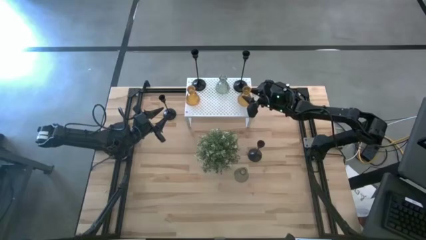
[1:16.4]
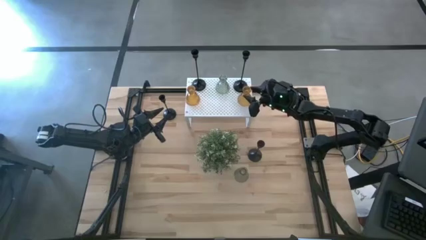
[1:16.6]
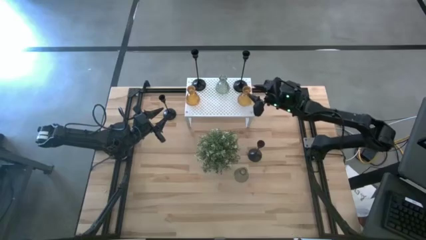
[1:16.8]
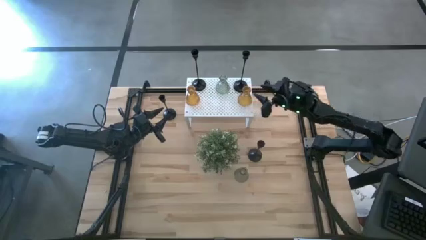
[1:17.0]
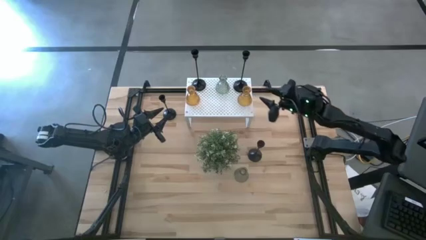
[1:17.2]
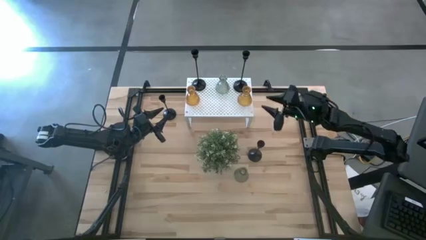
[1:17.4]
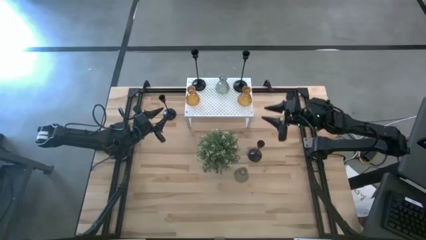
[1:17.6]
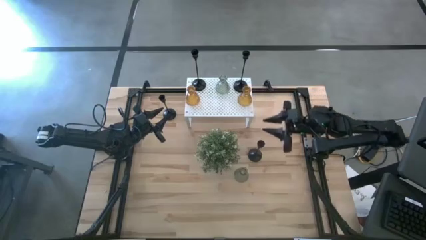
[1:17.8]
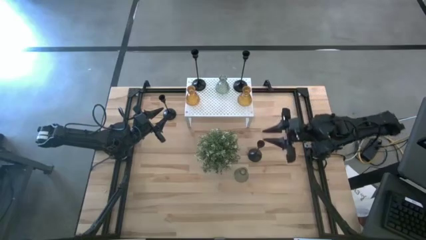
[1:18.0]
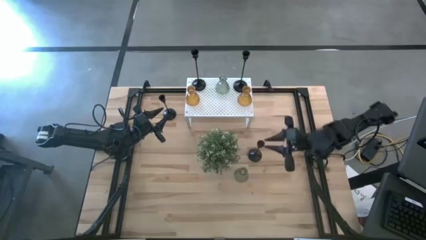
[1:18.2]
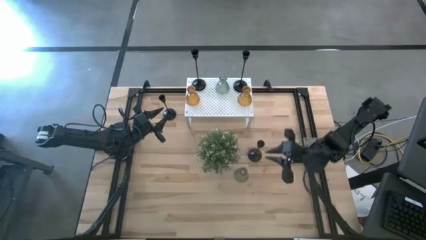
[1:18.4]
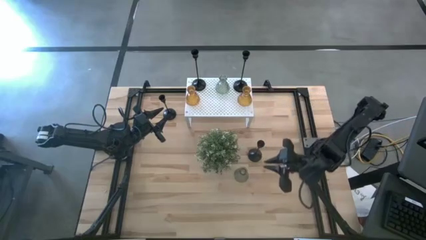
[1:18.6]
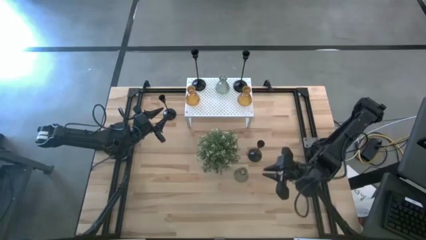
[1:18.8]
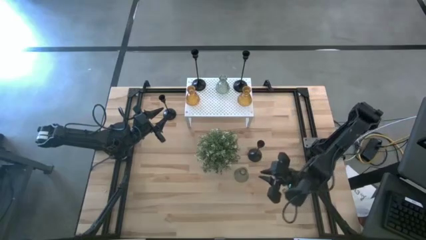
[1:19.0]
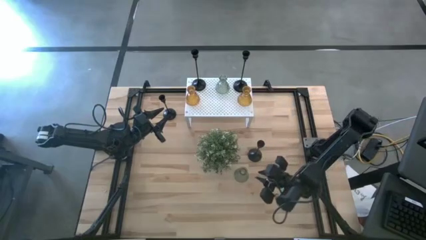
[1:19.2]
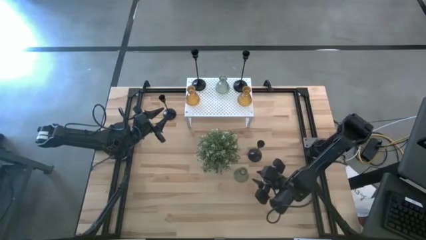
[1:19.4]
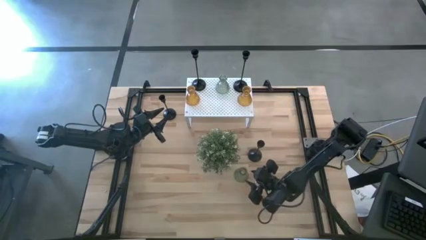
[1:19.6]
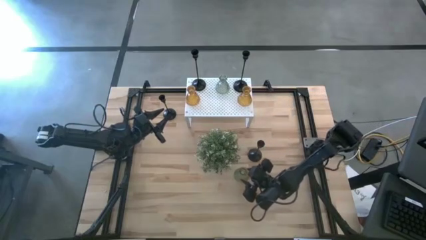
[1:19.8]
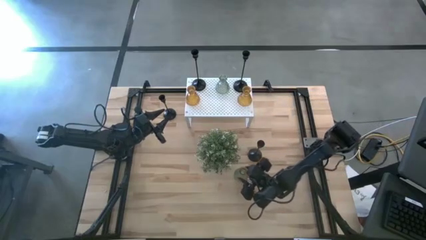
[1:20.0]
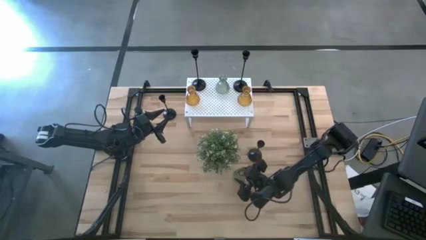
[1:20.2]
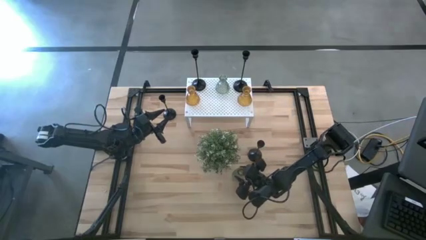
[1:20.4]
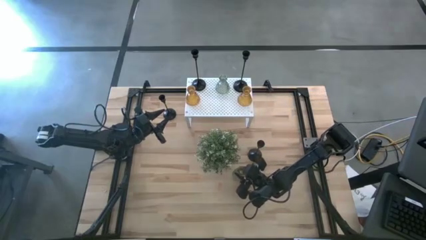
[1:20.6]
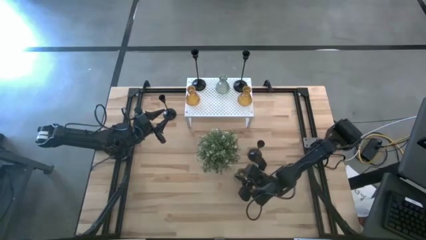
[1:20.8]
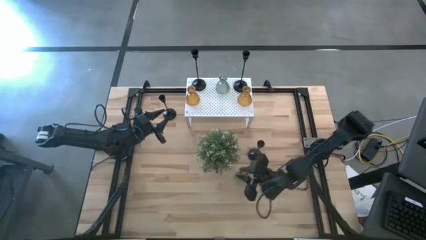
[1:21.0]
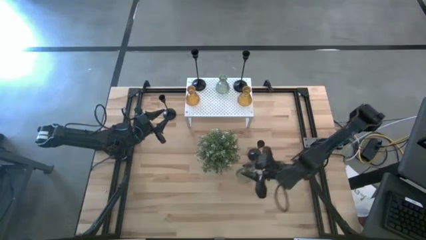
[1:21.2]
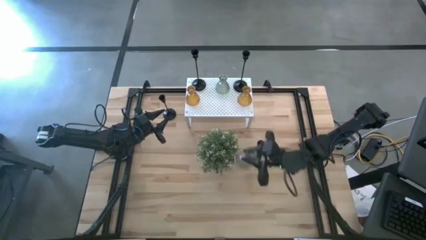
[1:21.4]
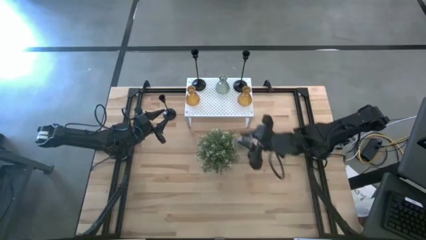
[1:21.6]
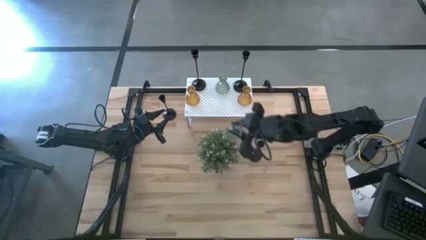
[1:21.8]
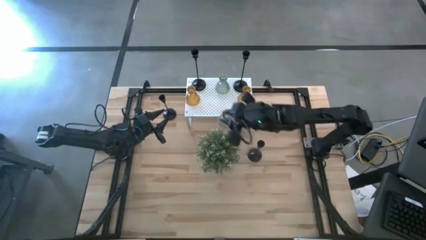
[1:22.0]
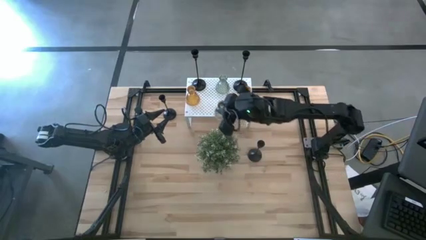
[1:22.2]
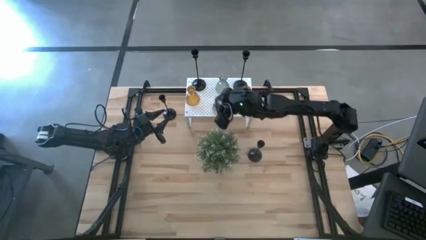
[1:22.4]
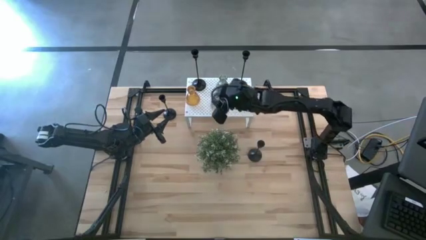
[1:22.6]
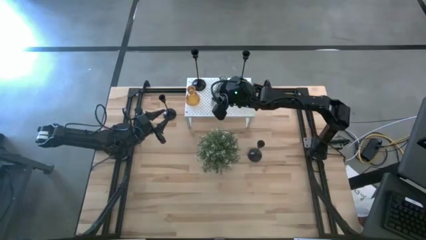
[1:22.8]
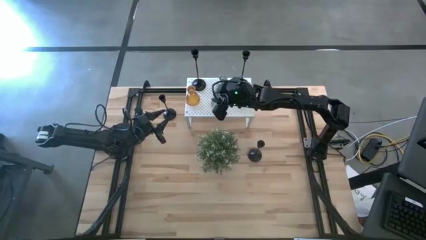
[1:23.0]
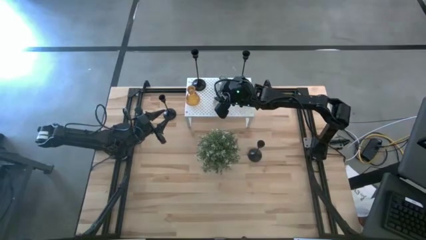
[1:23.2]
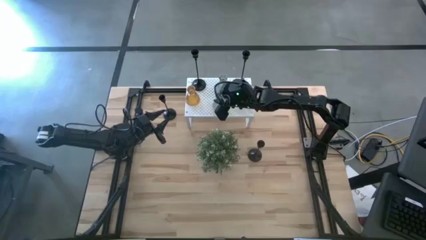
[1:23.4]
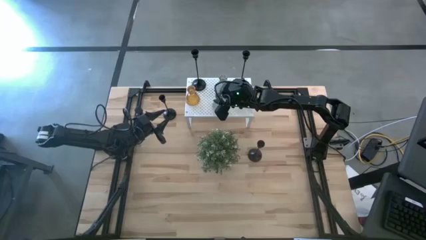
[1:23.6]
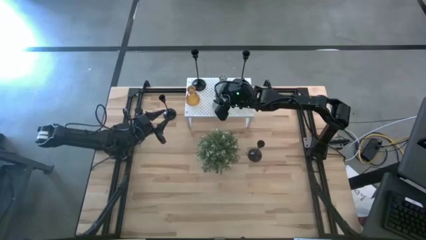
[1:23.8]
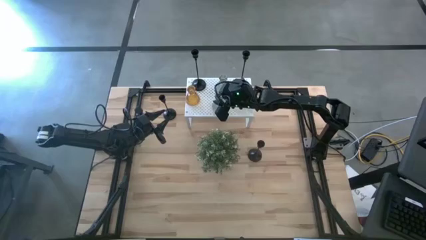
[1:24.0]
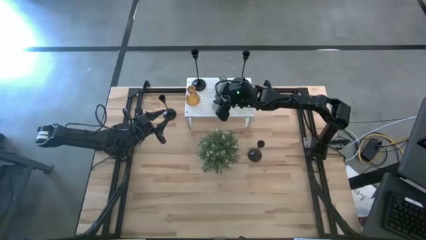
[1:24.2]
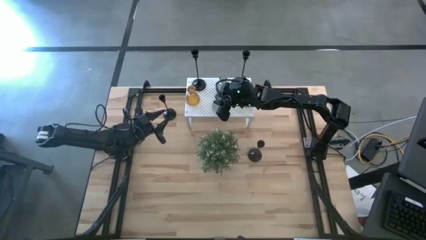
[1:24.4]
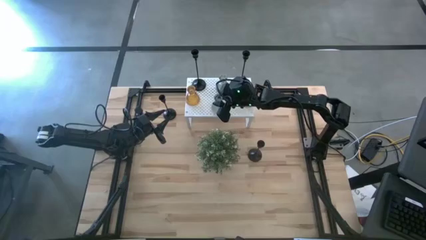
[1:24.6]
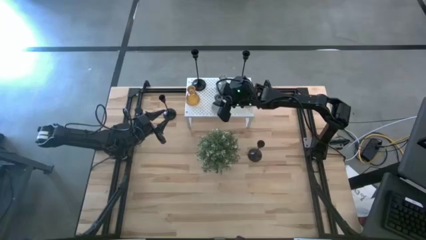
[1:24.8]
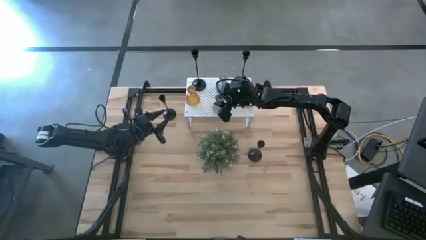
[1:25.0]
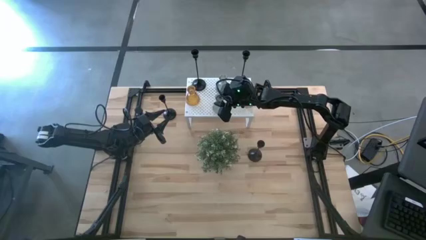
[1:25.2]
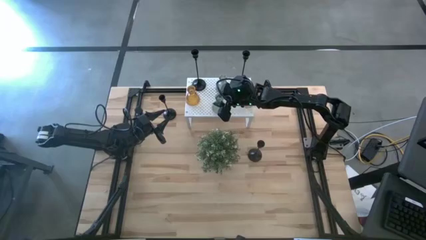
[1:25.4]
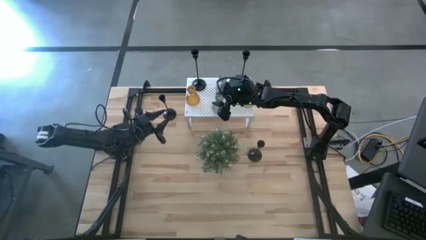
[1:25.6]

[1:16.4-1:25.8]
Task: Pick & Place candle stick holders
Put the green glass candle holder on the shelf

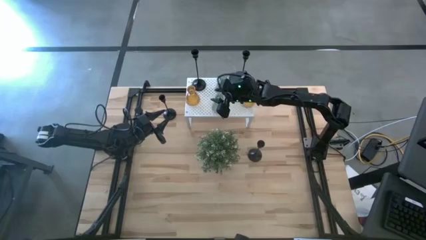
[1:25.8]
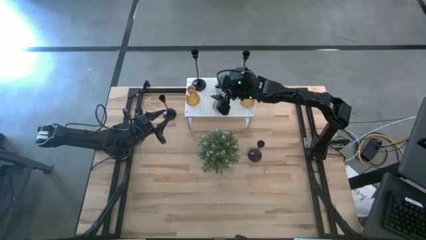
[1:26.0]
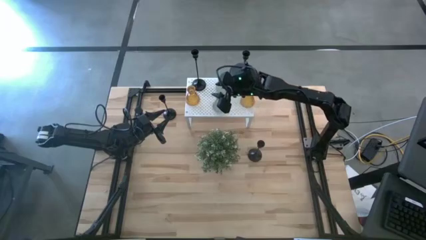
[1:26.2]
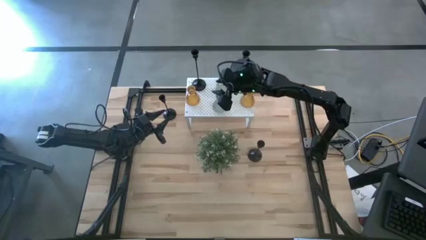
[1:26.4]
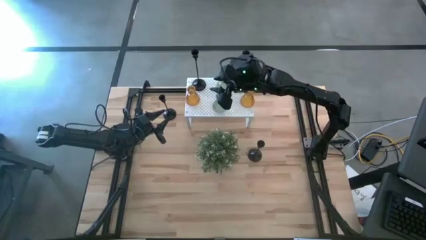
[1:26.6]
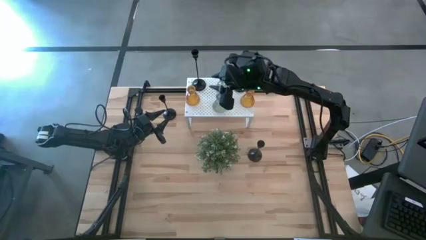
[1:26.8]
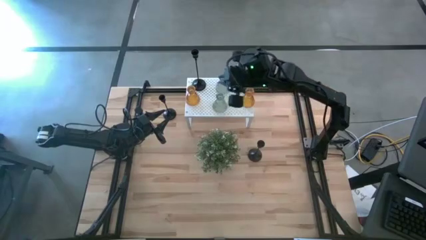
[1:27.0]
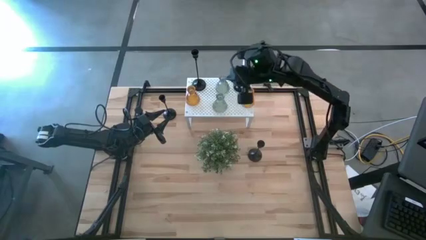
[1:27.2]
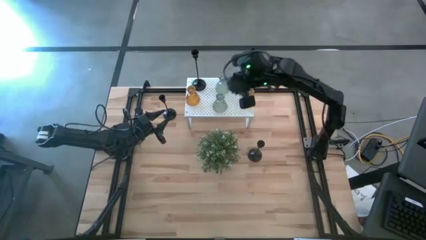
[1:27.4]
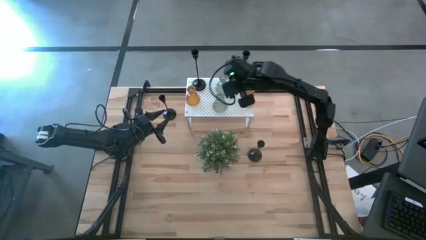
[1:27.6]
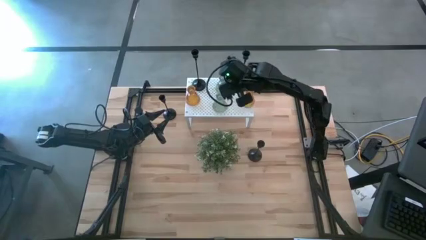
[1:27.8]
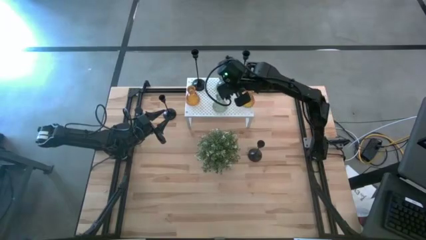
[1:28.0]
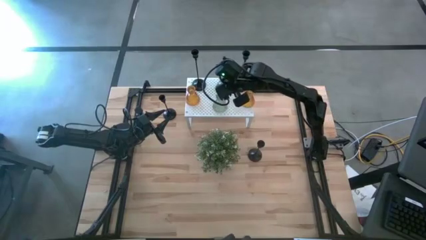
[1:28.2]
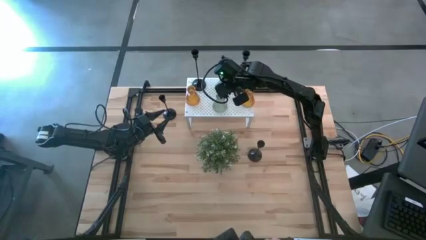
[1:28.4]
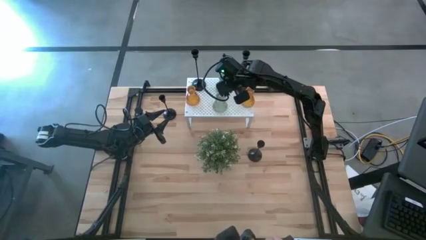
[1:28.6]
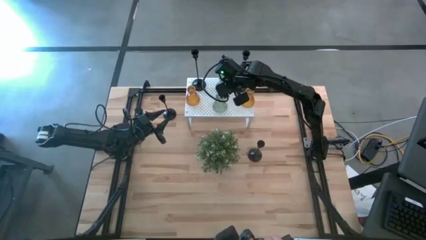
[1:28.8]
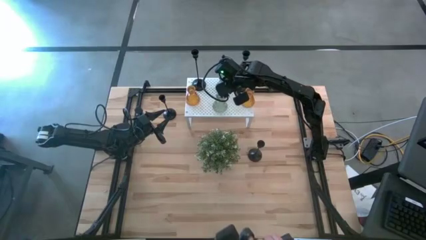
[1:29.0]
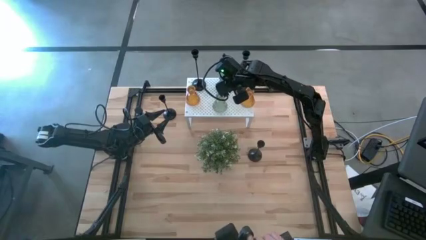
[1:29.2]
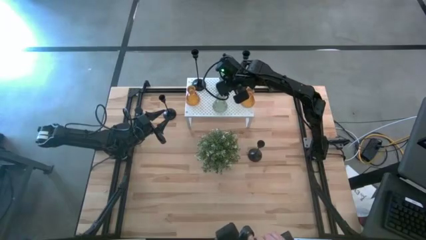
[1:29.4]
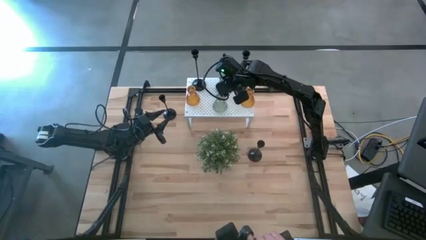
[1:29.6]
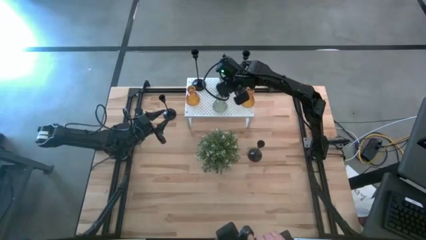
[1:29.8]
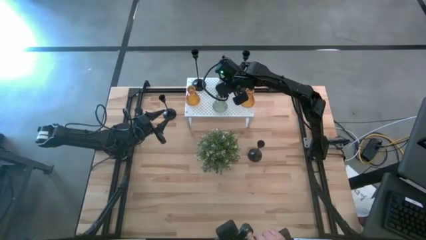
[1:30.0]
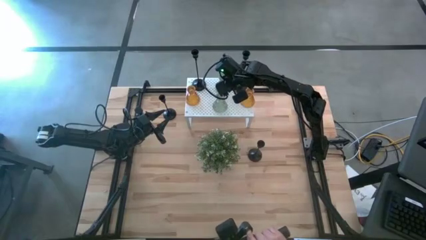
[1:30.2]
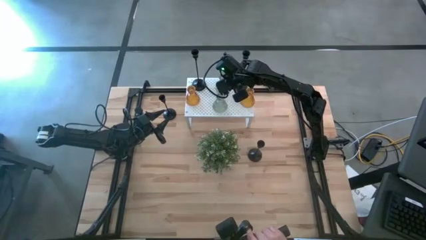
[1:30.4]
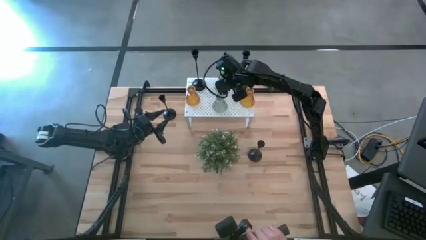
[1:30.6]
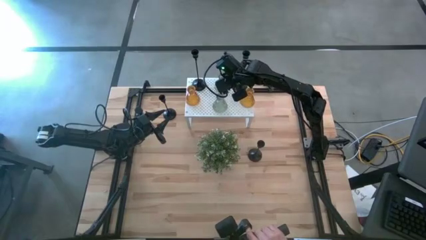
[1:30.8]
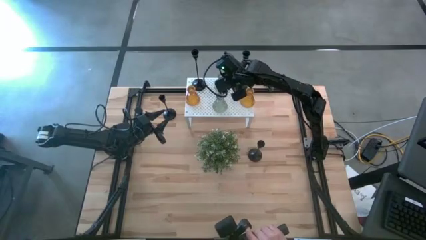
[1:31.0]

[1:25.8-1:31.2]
Adjust the green glass candle holder
